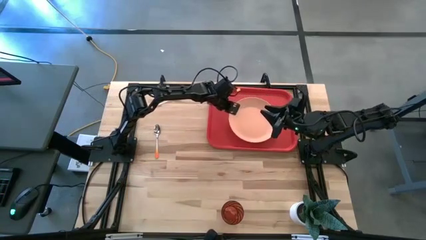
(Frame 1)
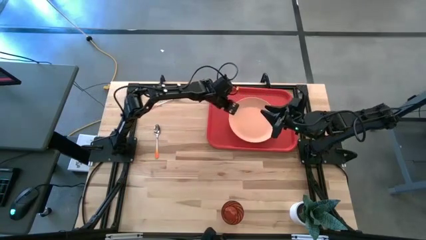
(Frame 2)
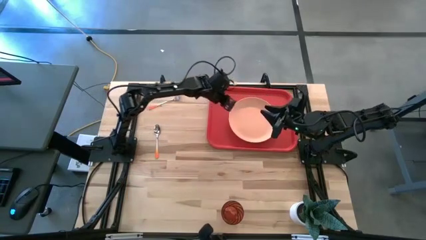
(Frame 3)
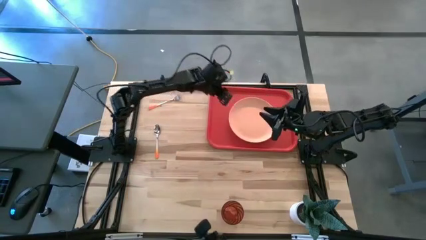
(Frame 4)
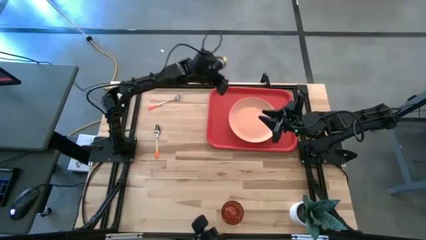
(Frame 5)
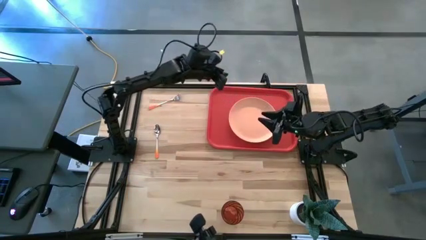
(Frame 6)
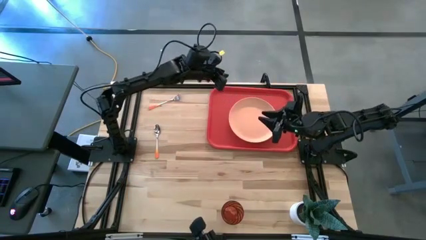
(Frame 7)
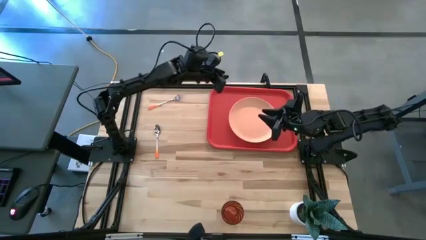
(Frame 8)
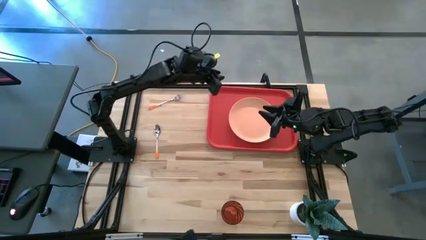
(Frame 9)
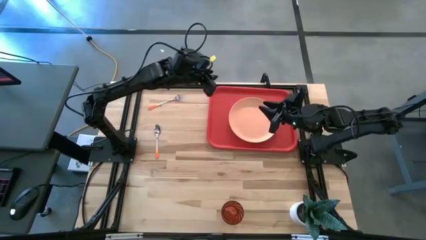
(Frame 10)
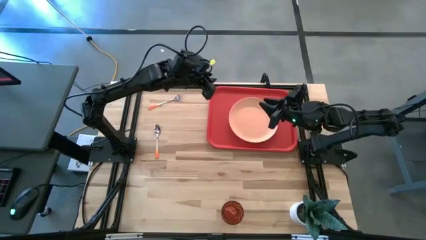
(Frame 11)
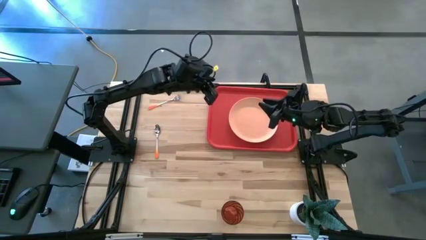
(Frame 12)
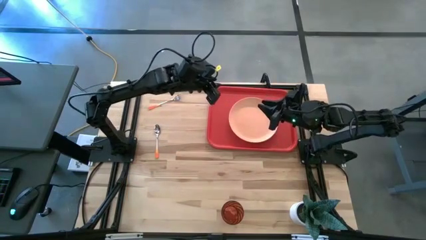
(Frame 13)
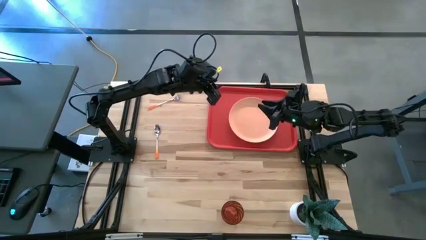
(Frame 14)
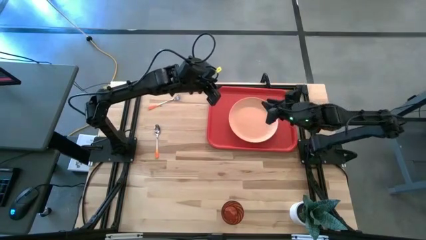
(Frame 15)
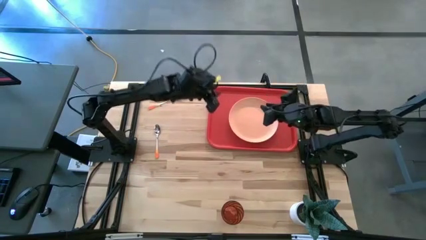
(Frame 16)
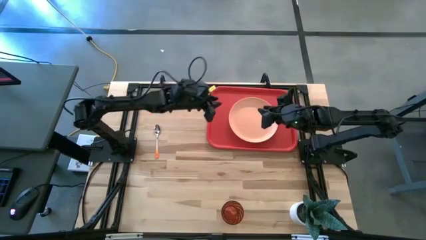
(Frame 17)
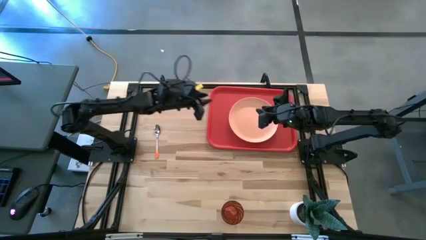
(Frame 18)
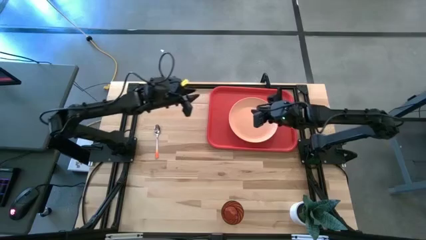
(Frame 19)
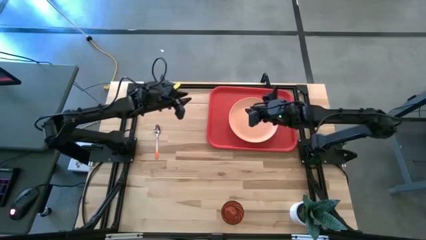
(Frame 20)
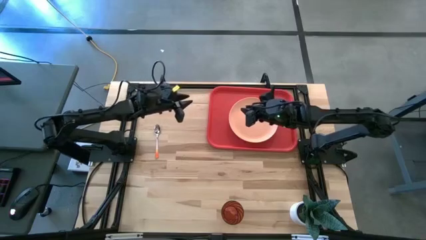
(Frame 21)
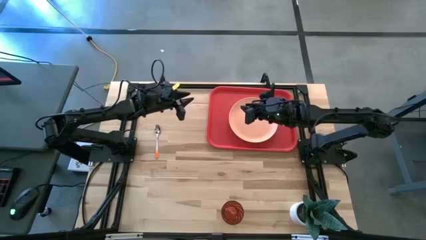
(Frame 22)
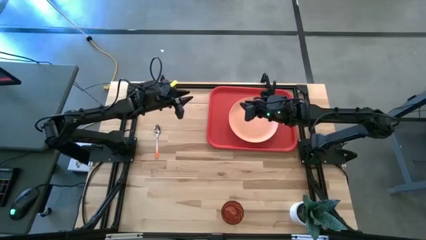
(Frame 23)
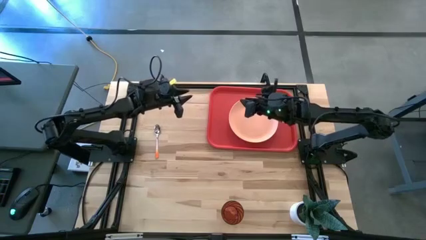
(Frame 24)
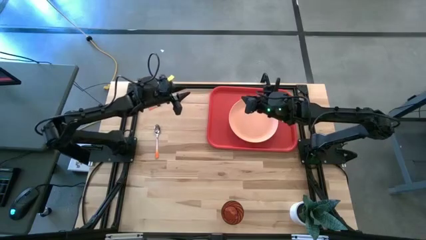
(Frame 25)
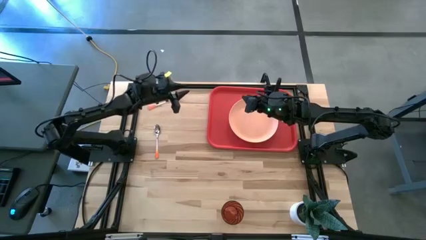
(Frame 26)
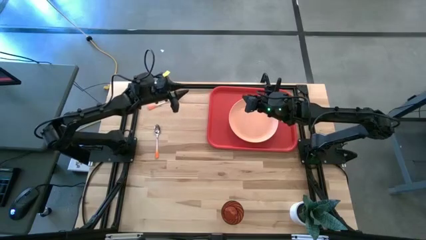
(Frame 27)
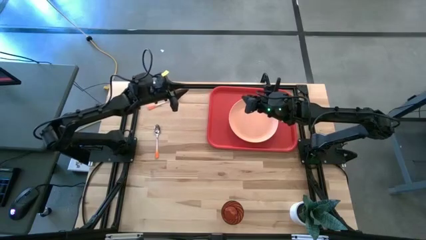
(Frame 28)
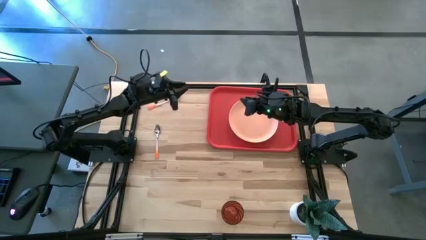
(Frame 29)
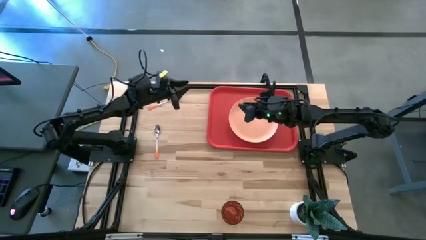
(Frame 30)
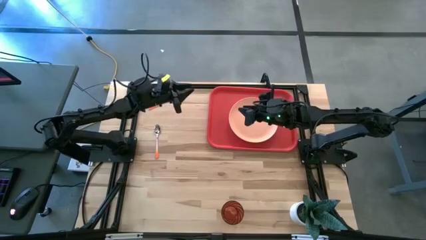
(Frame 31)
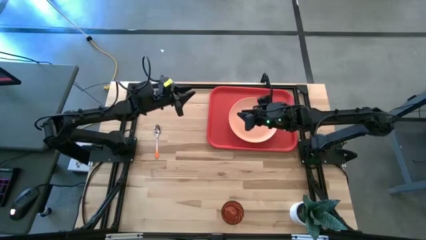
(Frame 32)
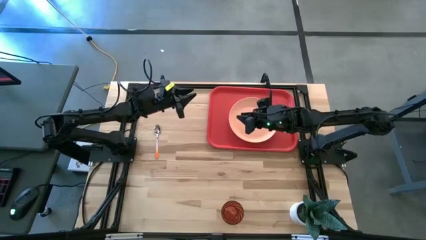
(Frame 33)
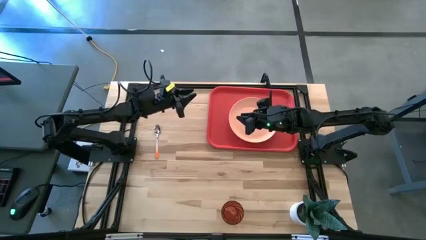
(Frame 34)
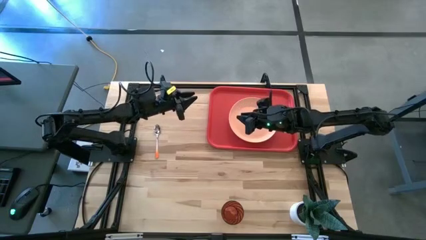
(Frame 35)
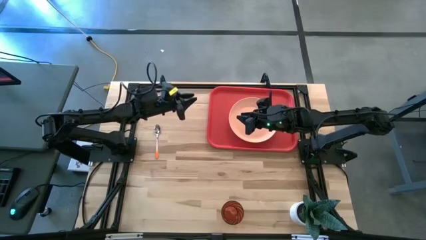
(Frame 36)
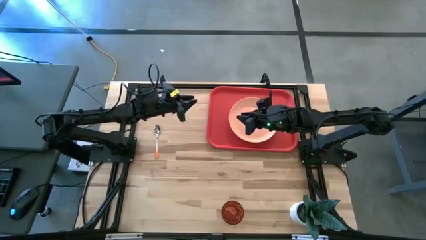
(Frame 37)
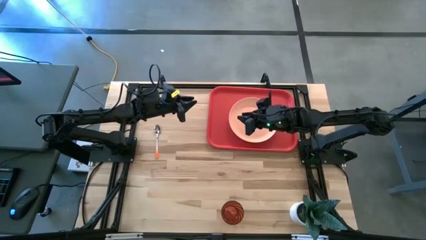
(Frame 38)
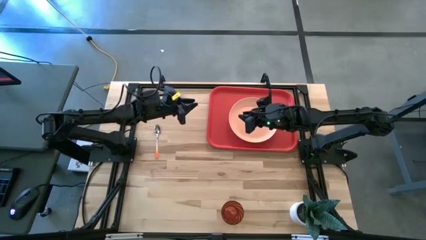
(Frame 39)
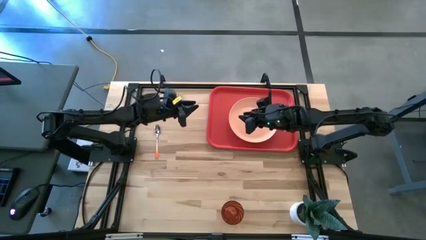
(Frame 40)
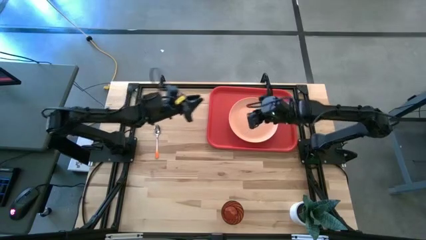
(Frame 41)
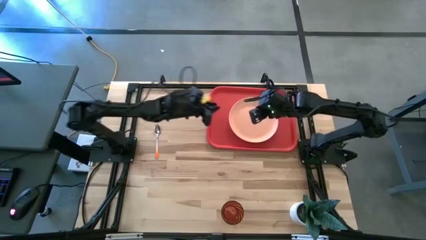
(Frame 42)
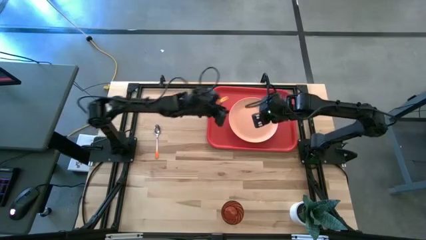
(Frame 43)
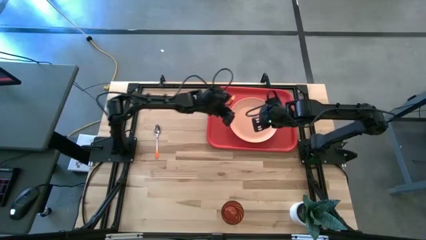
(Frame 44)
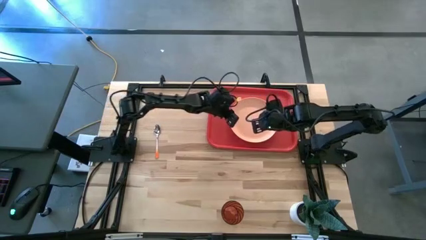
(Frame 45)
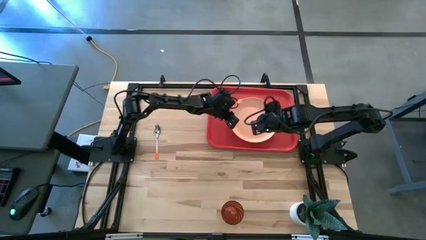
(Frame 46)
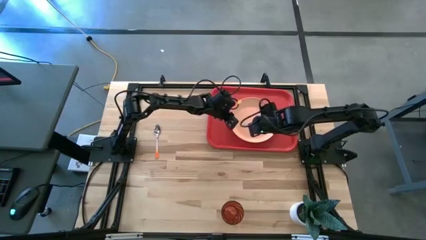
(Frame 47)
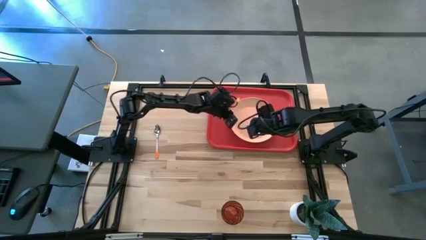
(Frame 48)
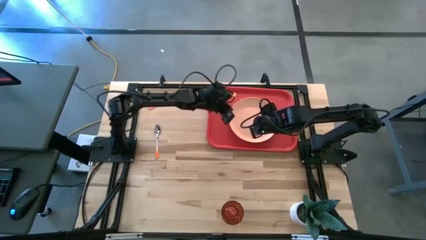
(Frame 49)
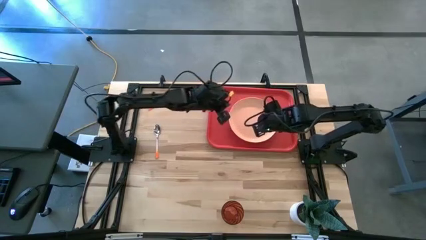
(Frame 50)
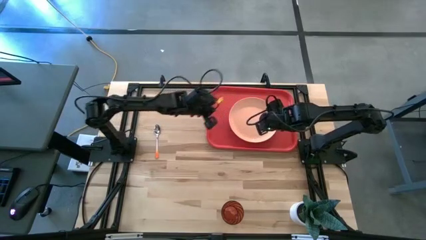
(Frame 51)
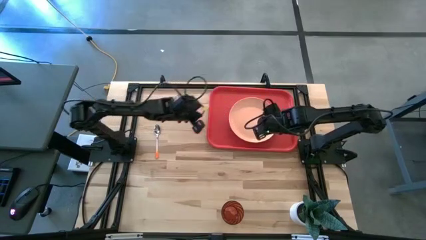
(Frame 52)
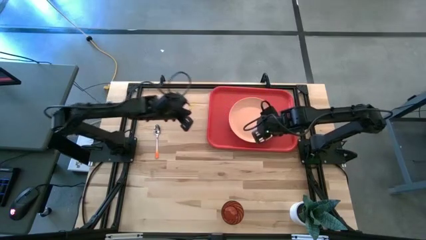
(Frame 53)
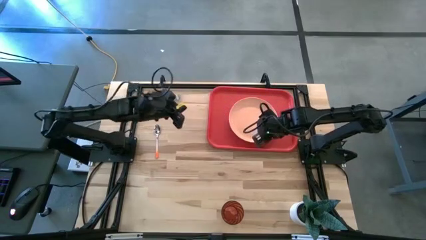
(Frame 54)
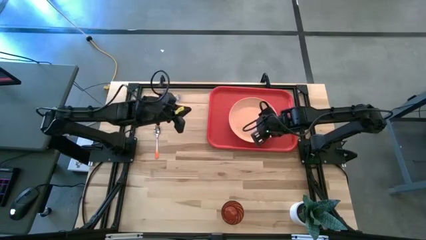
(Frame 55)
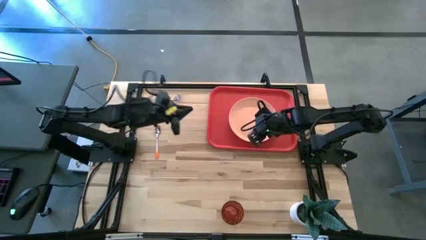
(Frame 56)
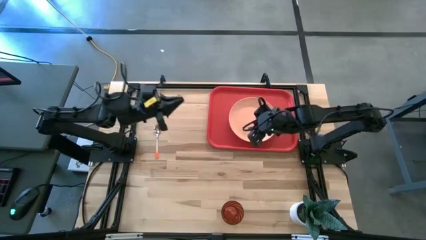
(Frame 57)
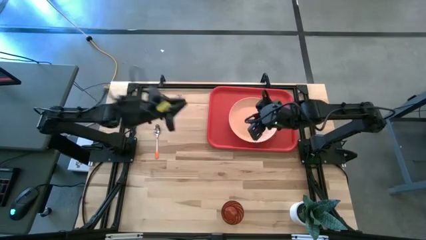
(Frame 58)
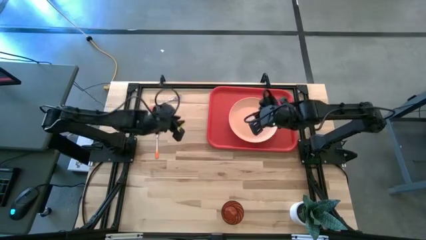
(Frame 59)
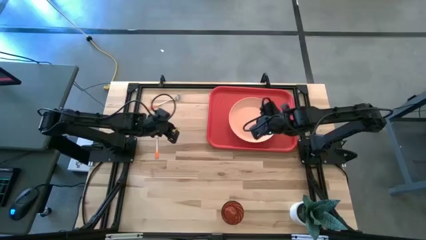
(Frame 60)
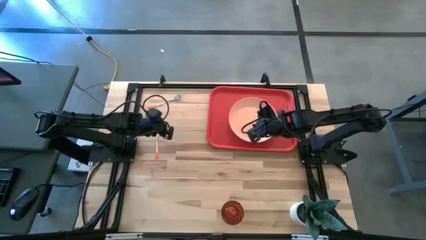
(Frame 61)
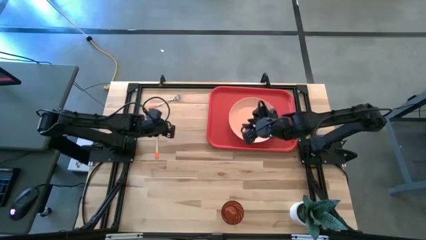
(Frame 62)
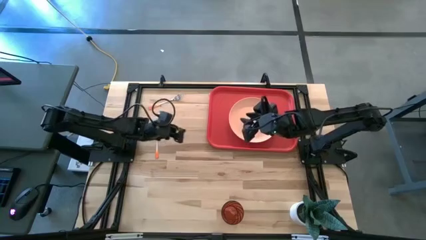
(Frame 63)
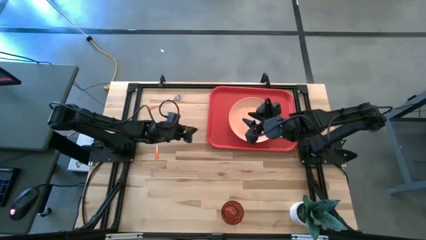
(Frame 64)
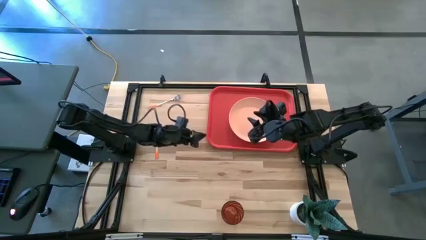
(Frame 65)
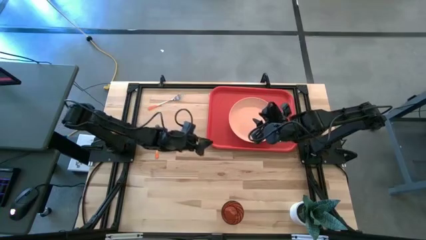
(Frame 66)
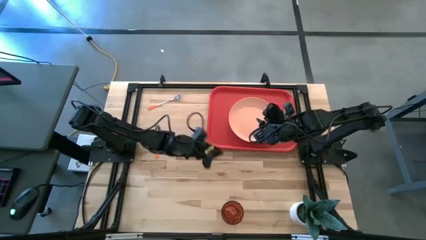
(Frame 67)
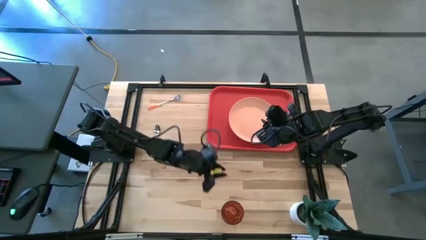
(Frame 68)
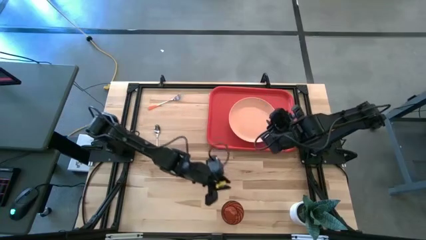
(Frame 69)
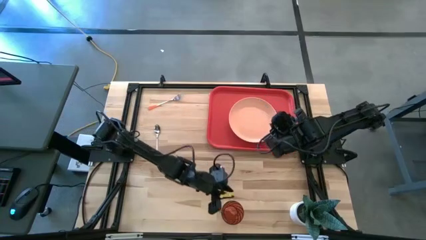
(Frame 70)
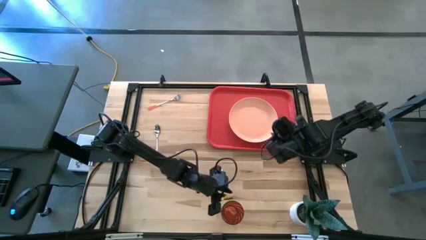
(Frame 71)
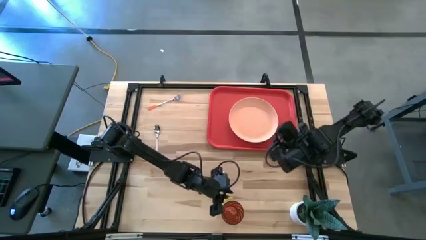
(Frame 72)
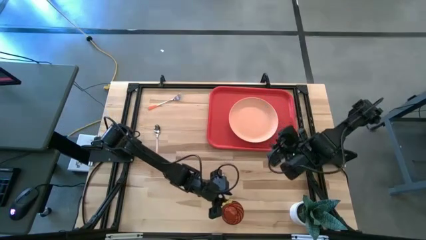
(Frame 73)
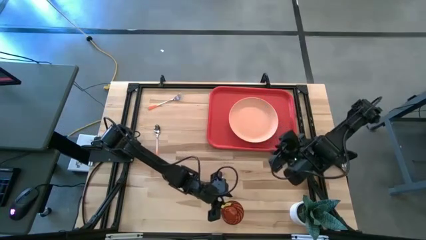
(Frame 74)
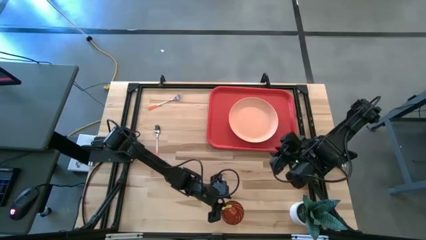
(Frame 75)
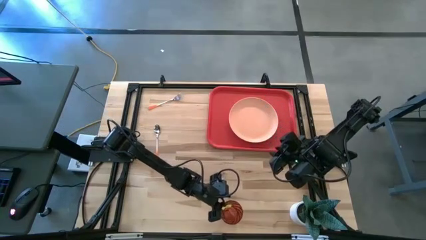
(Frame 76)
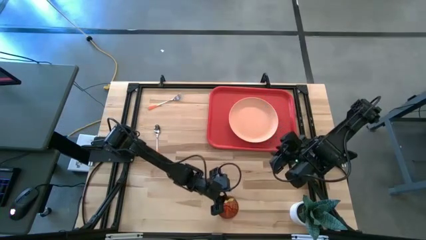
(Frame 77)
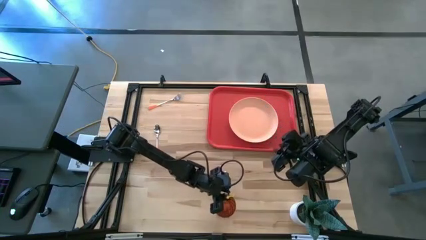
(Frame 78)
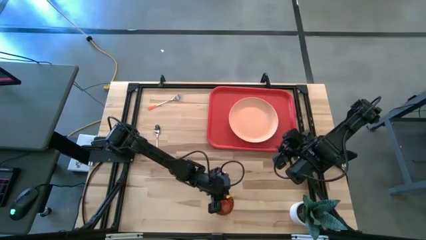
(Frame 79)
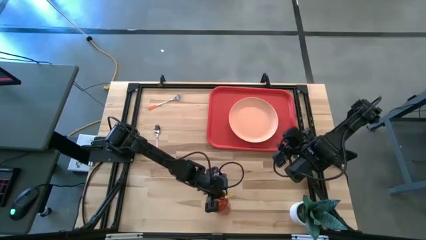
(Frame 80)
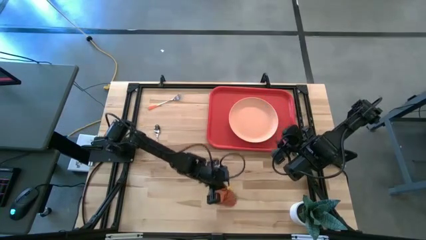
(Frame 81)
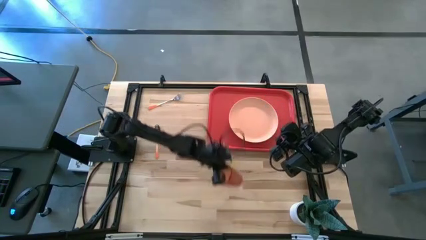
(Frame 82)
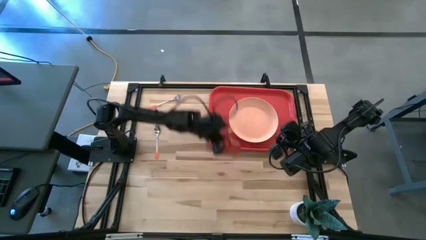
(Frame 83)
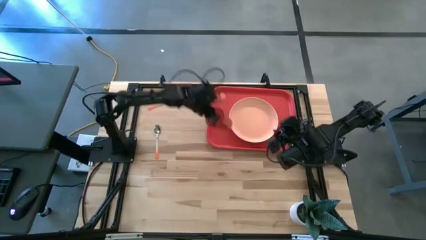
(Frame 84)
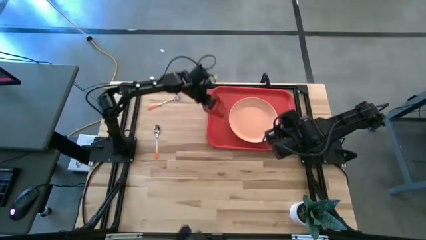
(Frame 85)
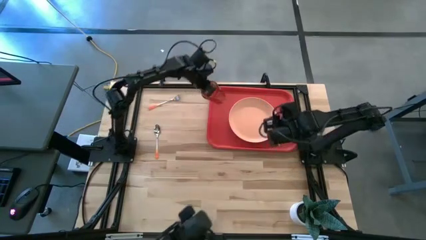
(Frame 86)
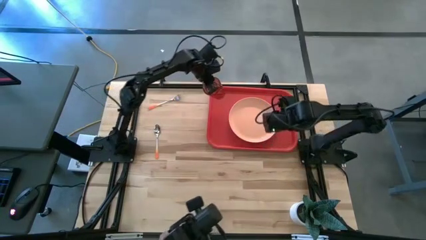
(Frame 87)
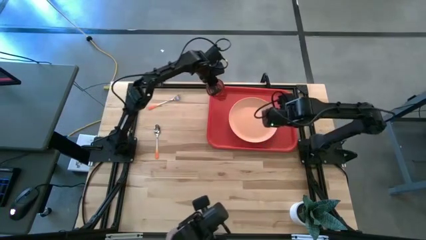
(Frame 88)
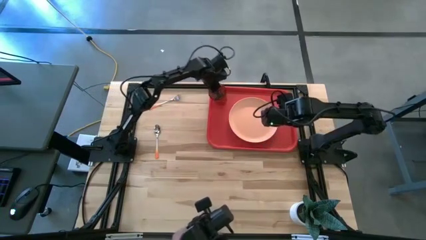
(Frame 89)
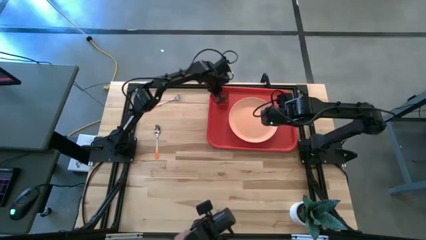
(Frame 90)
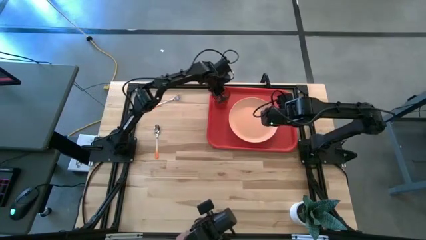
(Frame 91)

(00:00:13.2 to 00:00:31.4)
Task: Pick and place plate/cup/fork/spoon on tray
Put the glass on the red tray to the left of the pink plate
